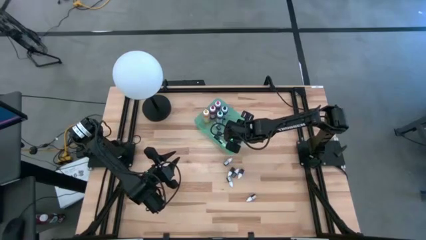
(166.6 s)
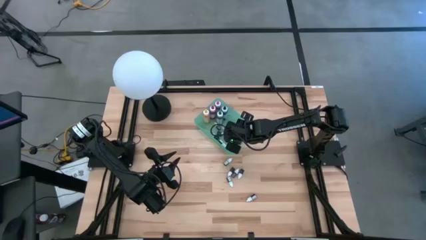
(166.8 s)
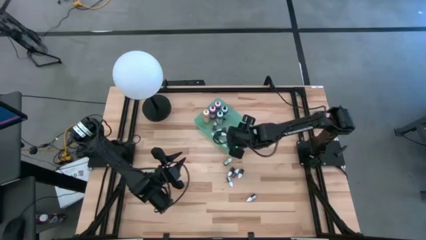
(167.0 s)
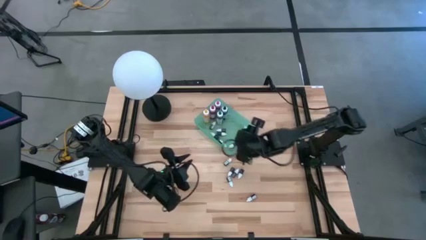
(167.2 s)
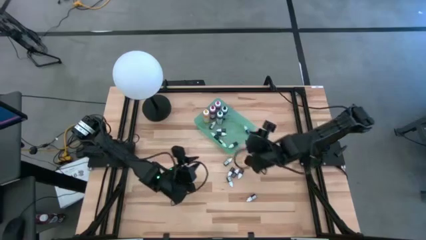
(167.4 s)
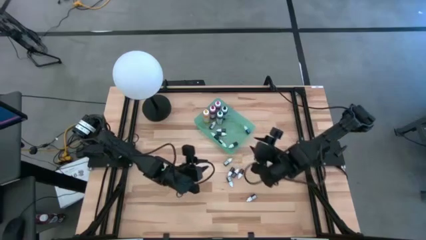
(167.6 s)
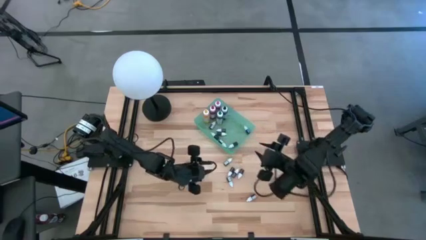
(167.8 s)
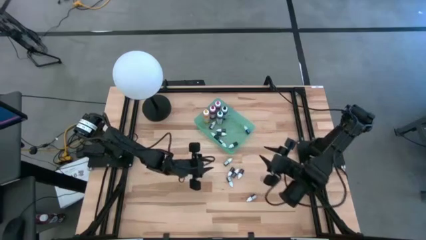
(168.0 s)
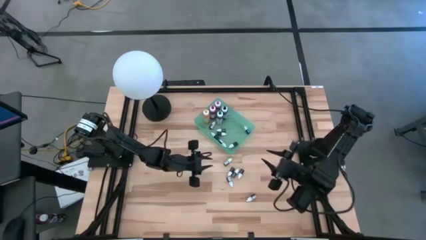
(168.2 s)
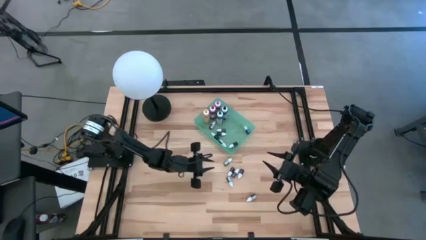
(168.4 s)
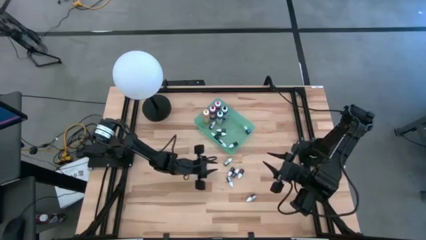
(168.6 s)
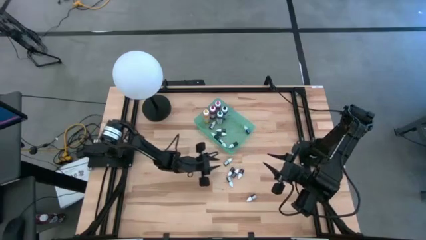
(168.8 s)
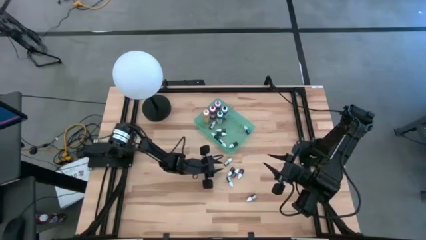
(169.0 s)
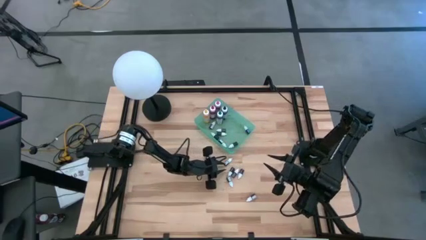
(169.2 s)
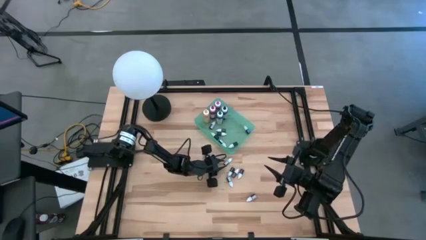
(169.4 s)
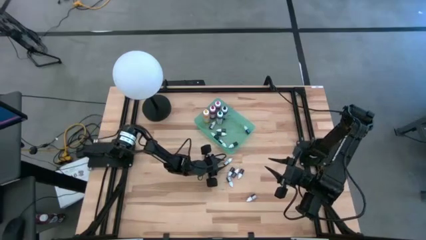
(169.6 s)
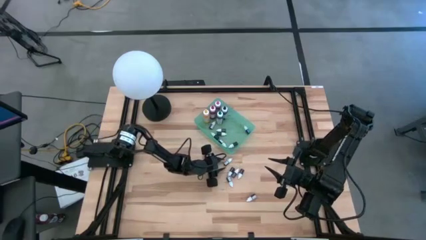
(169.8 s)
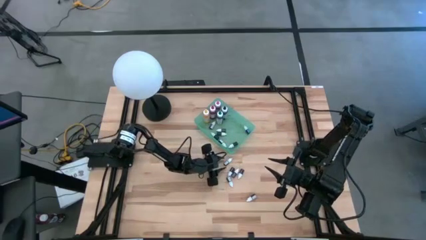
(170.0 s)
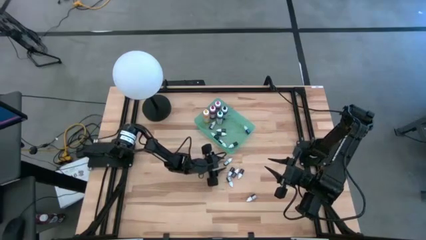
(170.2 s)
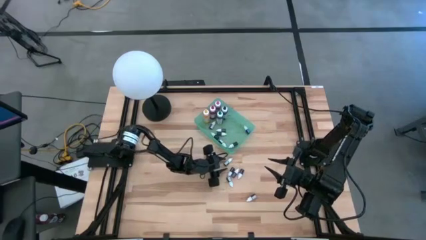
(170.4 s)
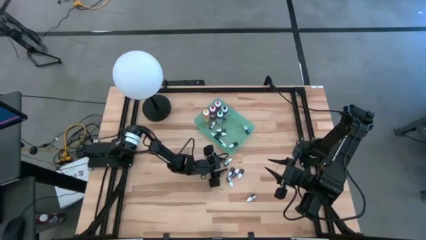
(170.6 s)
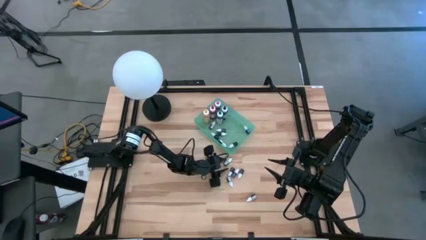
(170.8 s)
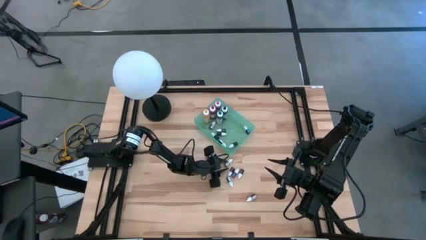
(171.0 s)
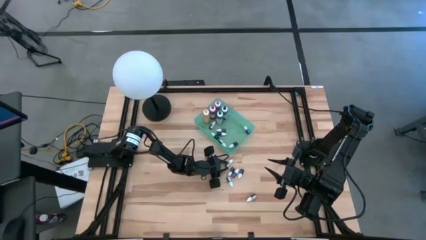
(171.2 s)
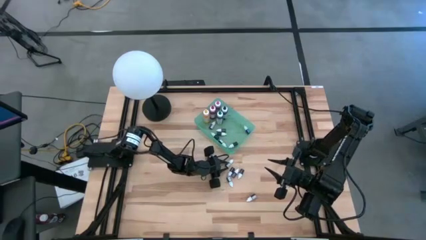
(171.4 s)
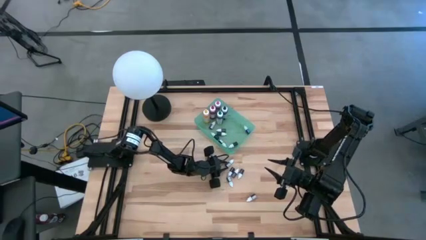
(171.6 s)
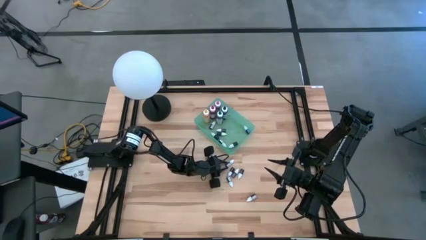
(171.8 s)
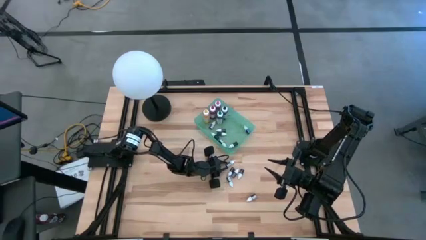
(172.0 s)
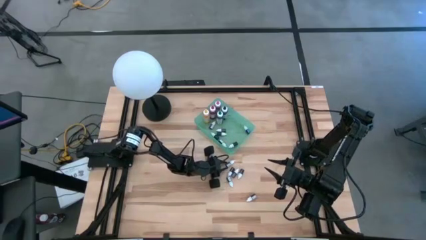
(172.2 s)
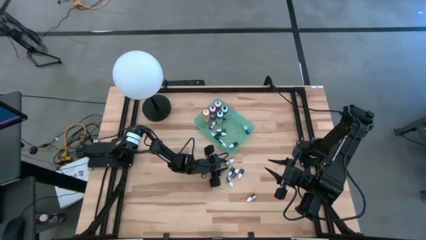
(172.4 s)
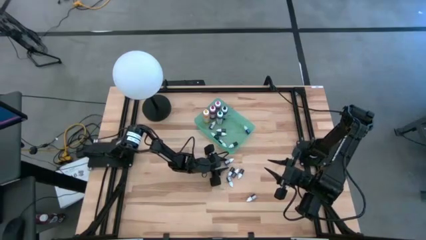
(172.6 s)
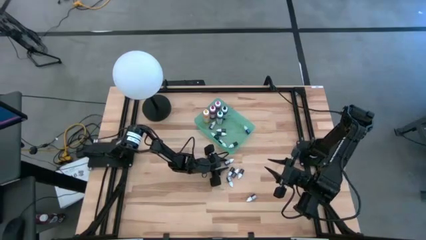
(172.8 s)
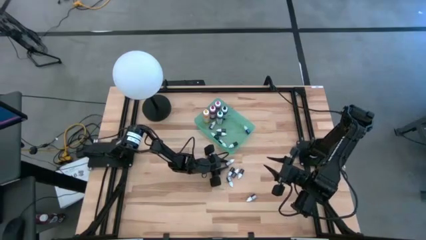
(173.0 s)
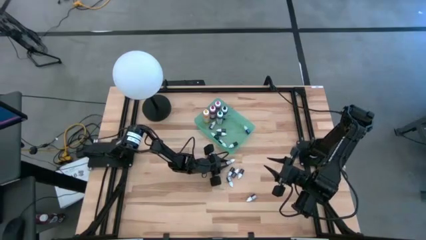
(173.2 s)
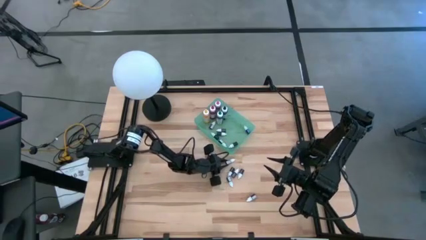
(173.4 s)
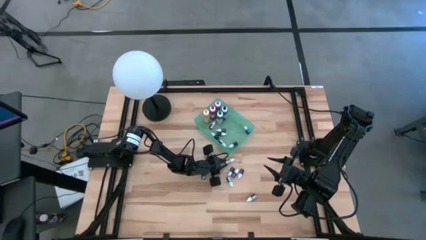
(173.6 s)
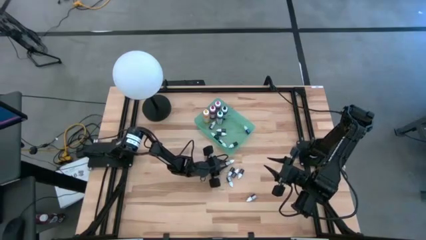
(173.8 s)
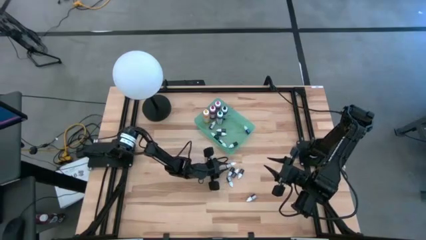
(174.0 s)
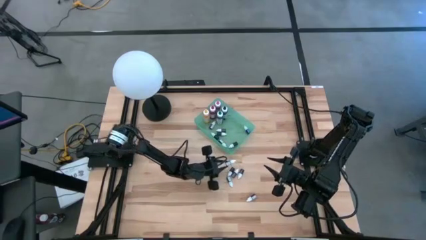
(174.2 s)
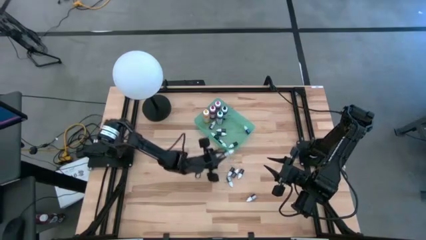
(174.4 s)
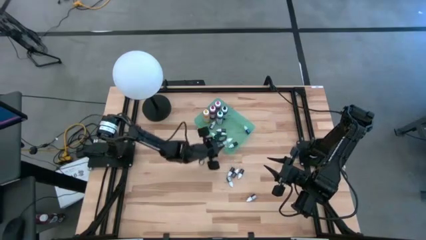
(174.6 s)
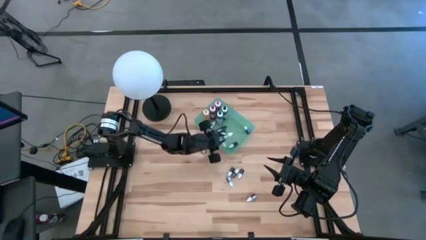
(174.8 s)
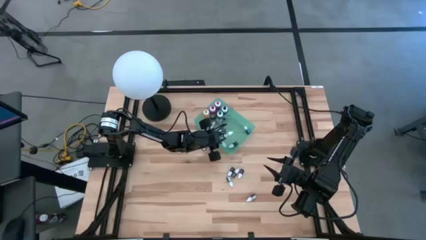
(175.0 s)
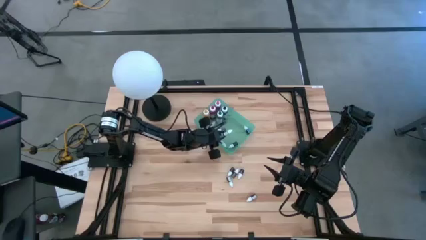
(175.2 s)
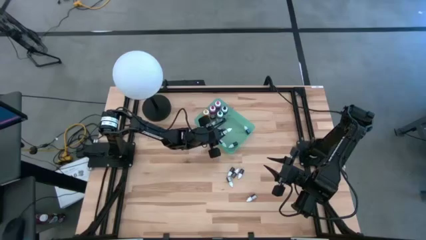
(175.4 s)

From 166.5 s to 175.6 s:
Task: Pick & Place food coloring
Put the small black food coloring bottle into the green bin

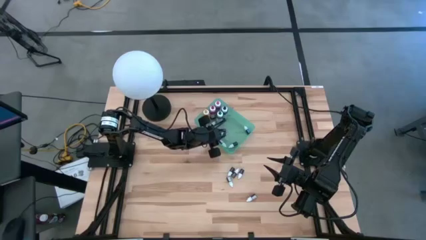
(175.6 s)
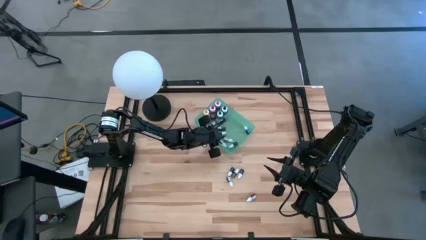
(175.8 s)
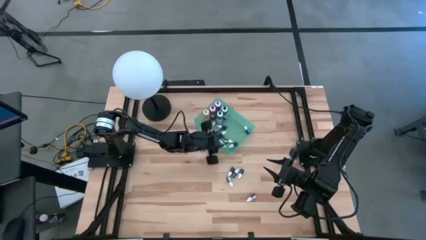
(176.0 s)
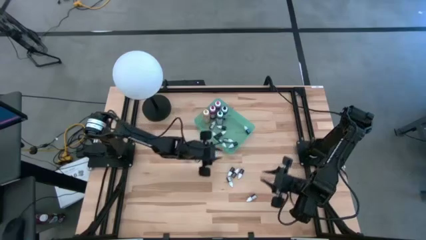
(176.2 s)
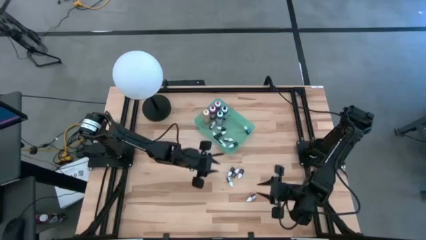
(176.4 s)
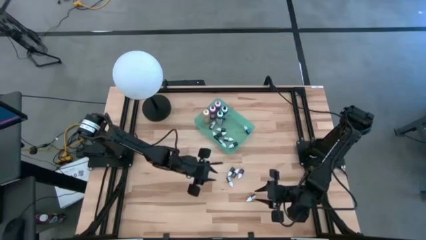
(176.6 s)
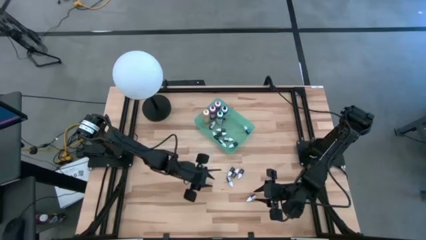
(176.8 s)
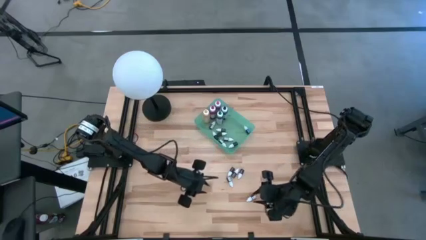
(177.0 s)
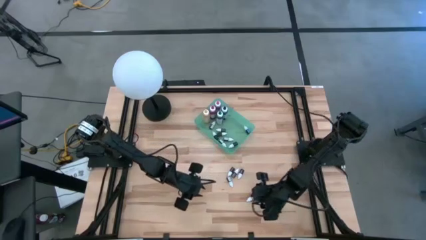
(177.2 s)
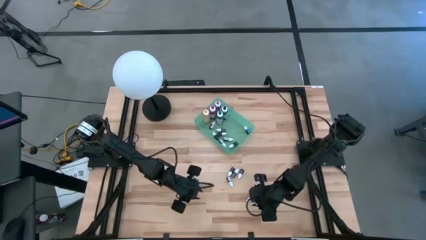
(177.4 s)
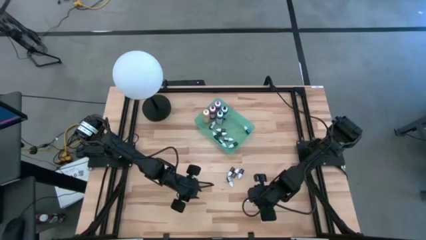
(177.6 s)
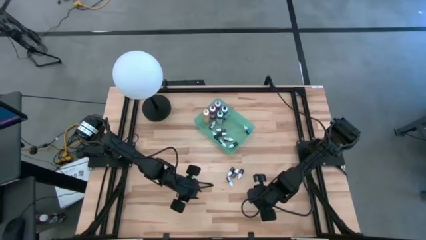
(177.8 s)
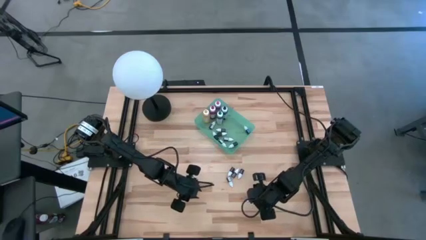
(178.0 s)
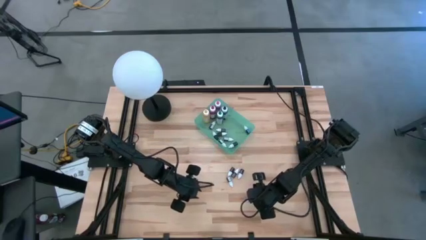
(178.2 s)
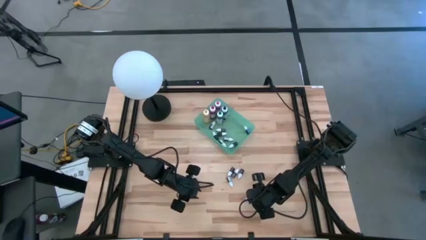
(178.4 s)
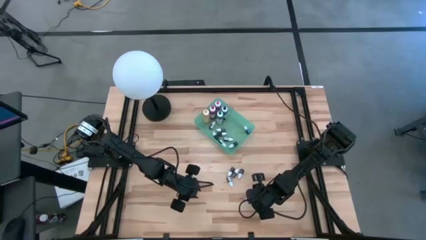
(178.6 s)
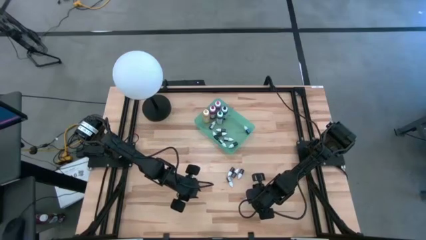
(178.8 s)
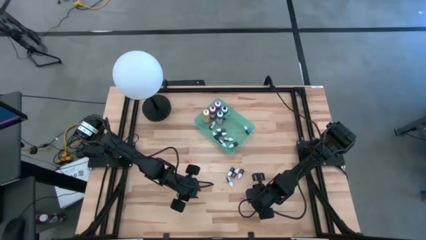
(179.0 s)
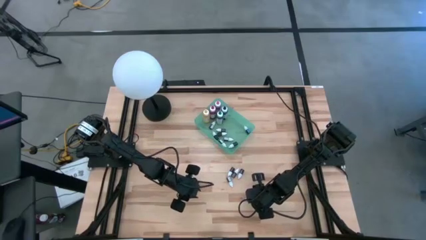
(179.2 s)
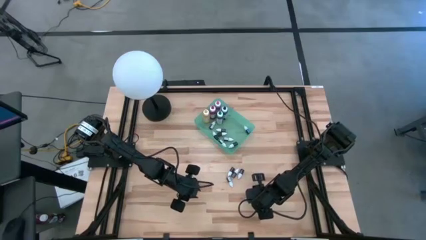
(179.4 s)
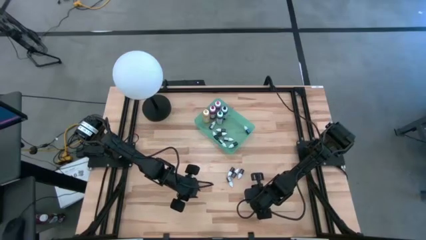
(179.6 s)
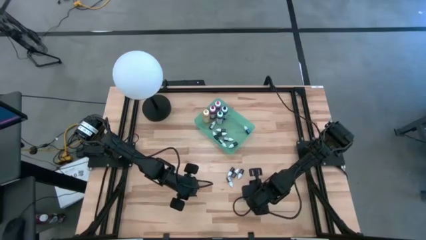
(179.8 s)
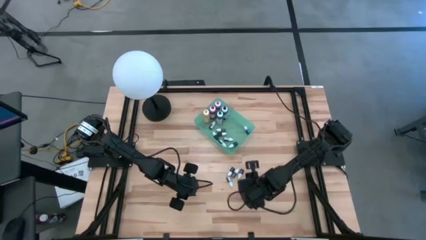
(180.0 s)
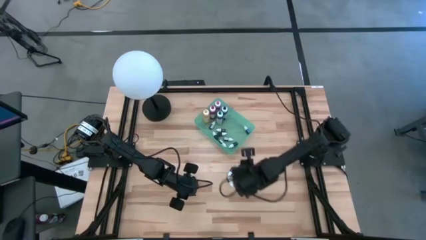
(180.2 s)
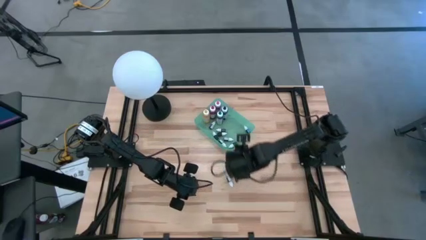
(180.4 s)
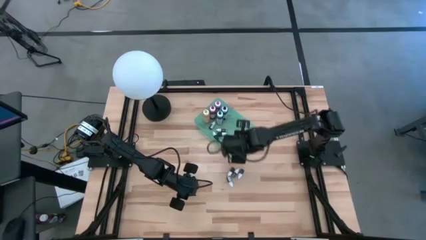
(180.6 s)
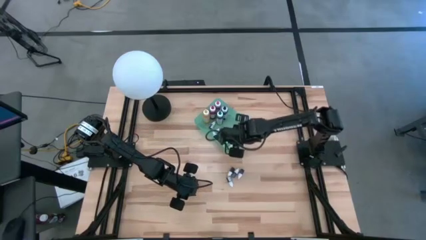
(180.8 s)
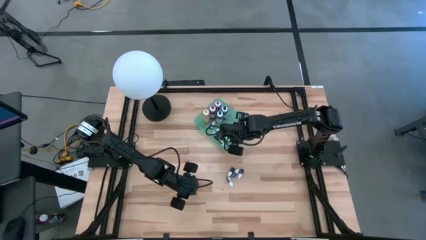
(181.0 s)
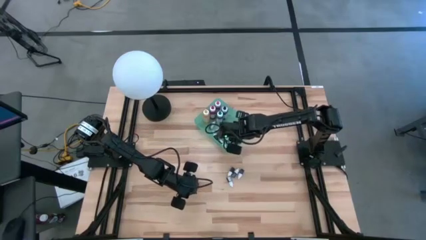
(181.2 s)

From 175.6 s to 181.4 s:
Put the small red food coloring bottle into the green bin
